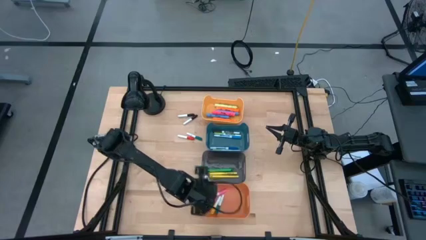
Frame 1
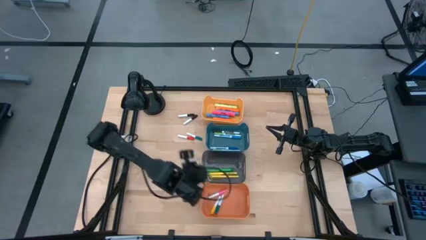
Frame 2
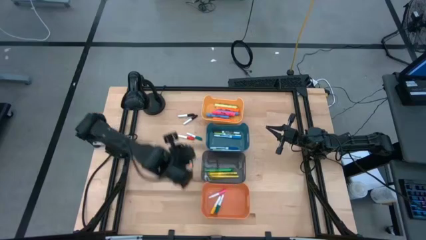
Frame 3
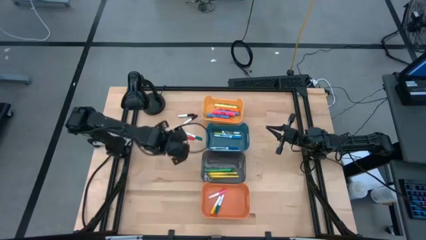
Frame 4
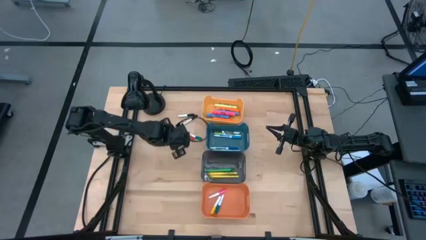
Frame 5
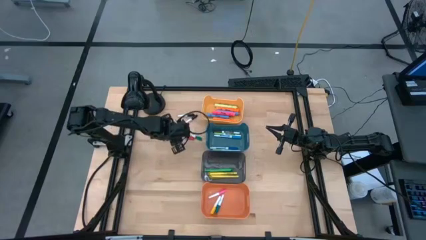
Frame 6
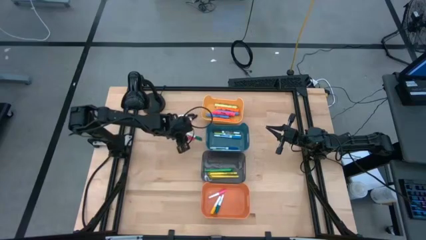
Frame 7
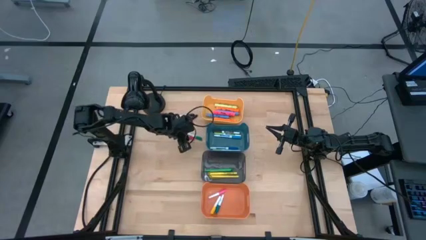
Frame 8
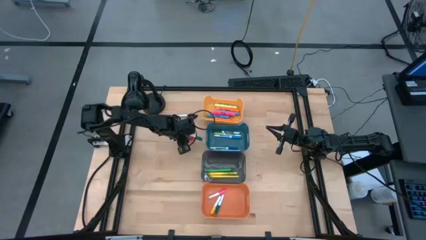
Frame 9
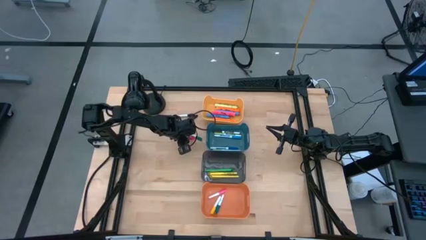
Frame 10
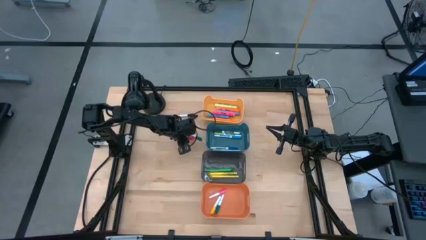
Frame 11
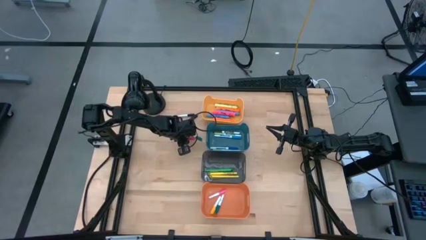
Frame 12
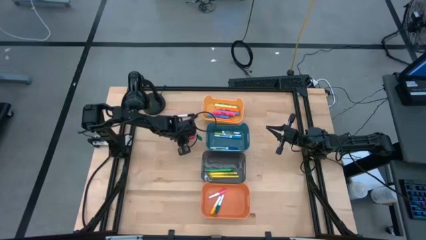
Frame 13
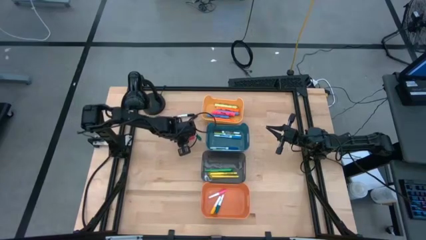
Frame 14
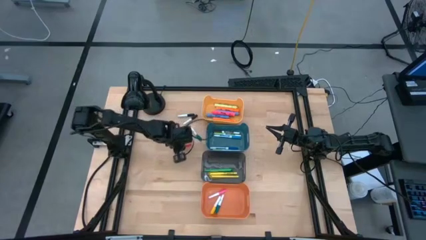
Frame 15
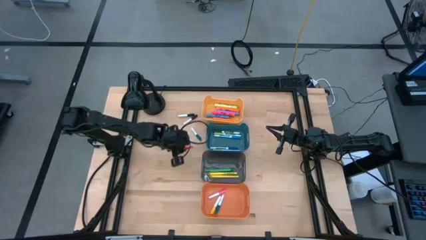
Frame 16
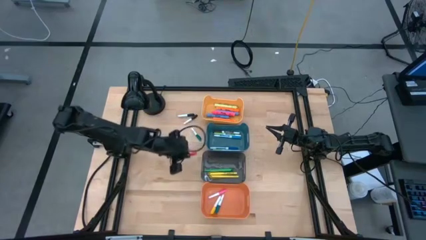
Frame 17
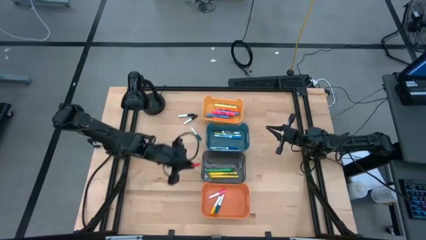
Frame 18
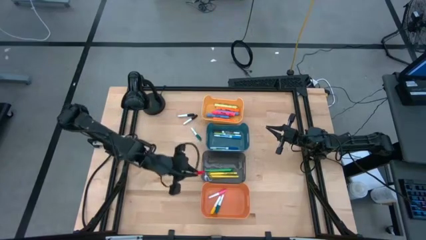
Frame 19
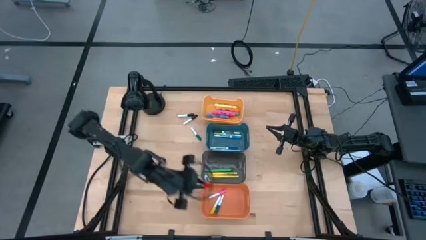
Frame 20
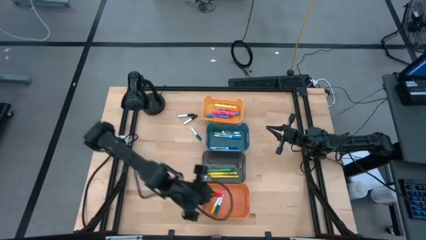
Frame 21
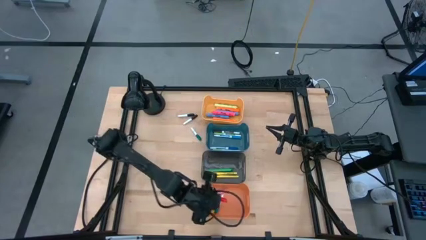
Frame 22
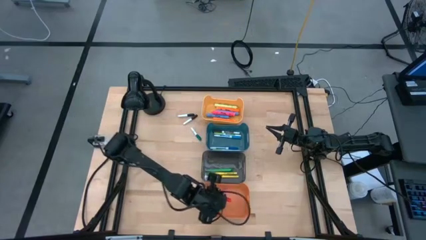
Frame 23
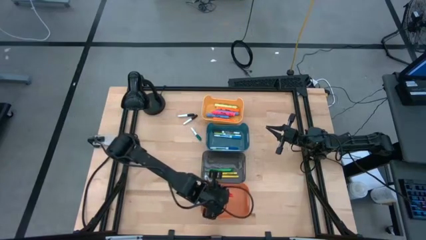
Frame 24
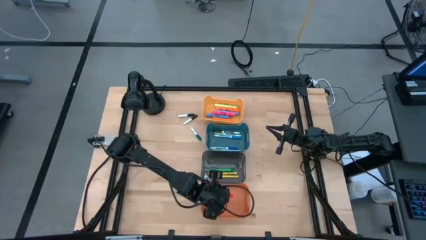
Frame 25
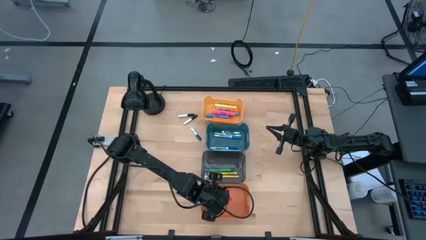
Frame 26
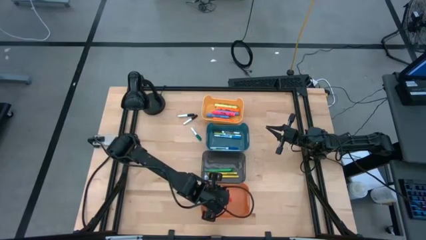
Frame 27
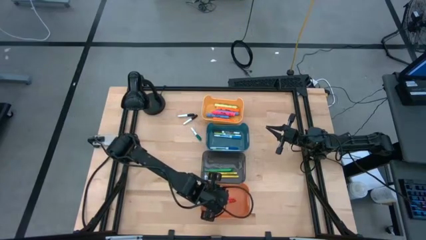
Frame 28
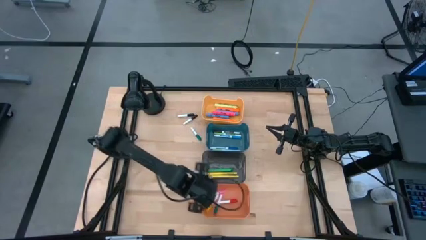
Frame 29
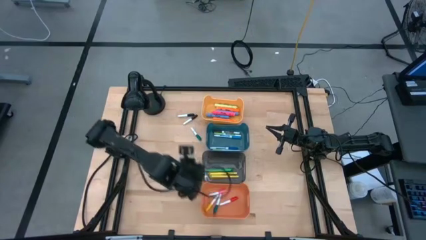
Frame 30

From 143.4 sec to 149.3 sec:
Task: Pick & Place Markers
Put the red mini marker into the orange bin

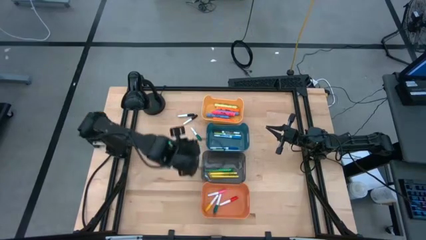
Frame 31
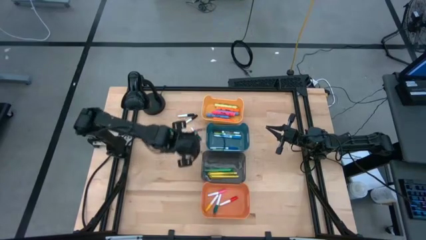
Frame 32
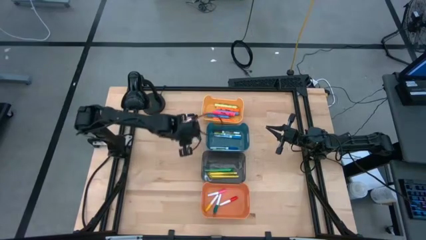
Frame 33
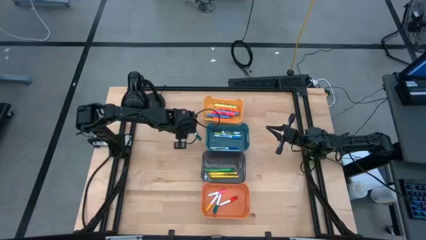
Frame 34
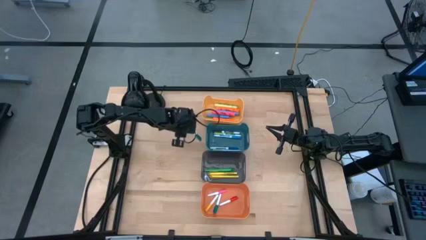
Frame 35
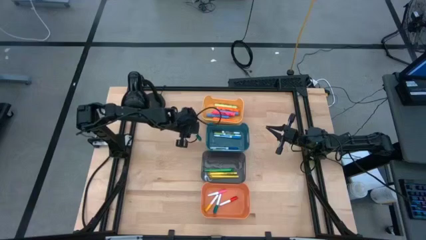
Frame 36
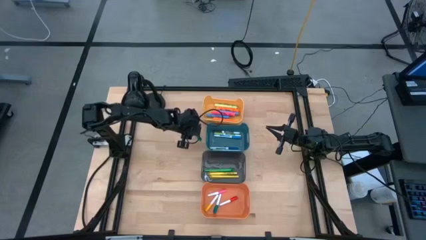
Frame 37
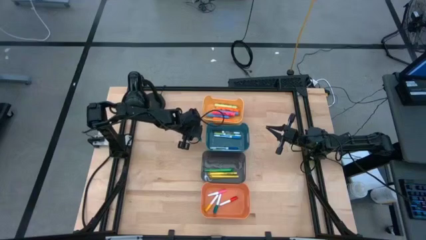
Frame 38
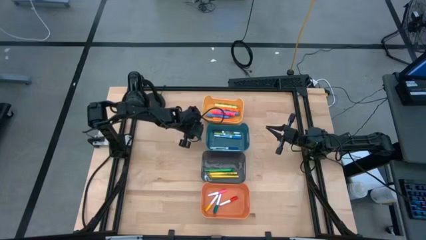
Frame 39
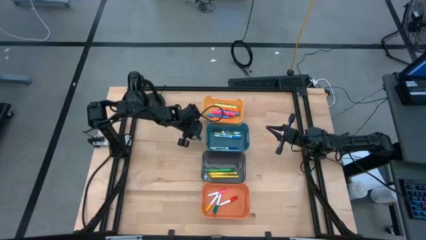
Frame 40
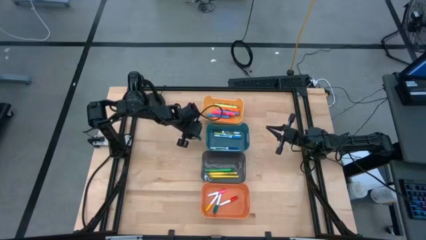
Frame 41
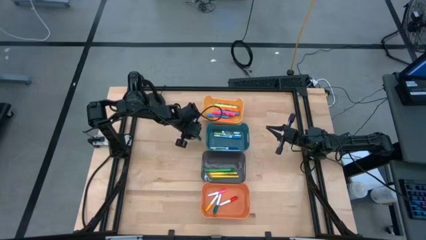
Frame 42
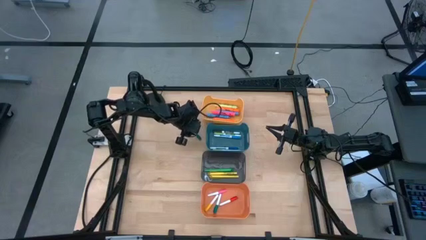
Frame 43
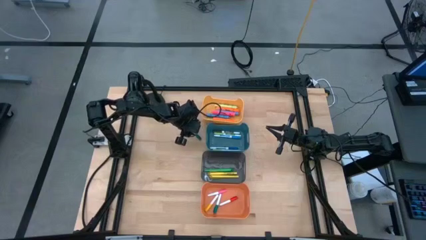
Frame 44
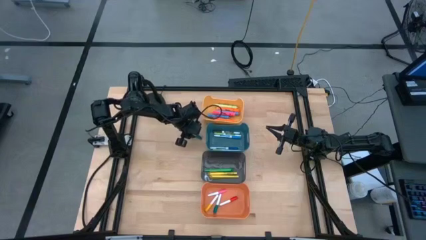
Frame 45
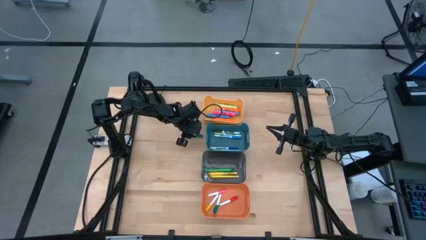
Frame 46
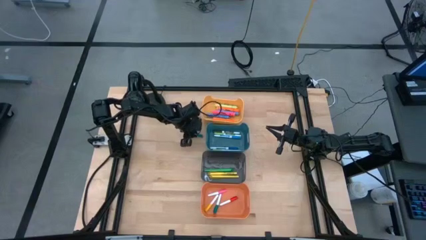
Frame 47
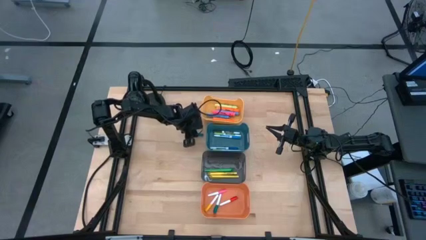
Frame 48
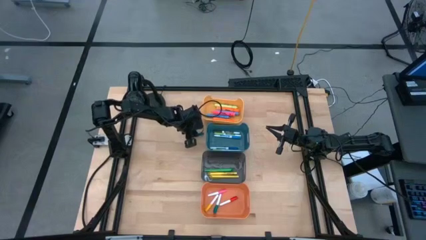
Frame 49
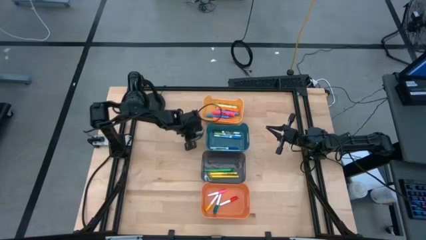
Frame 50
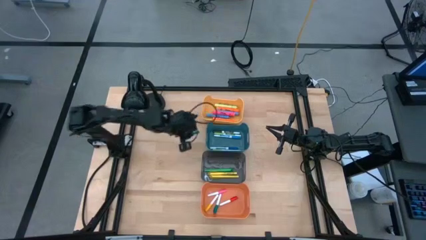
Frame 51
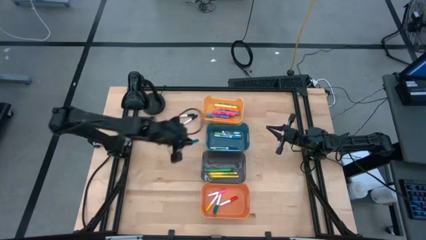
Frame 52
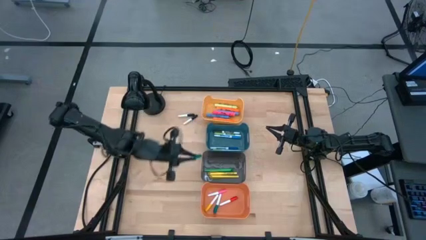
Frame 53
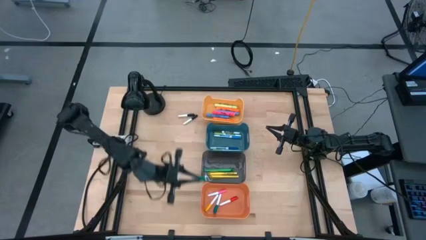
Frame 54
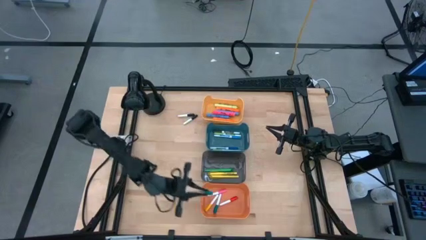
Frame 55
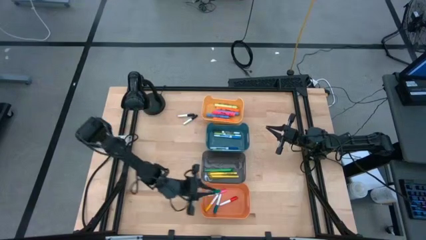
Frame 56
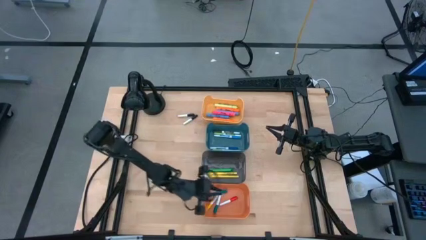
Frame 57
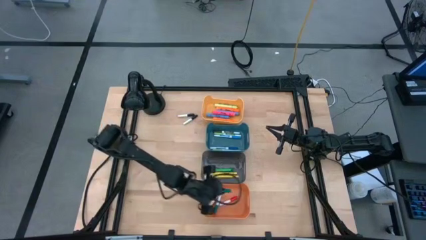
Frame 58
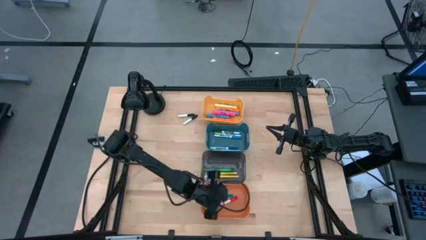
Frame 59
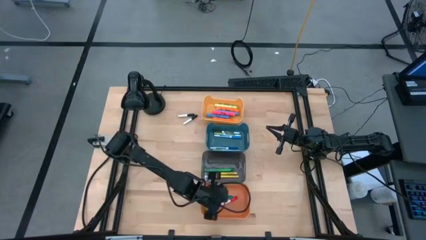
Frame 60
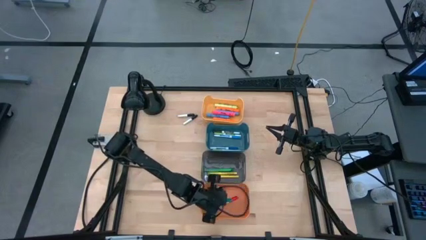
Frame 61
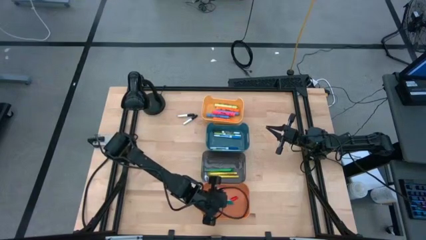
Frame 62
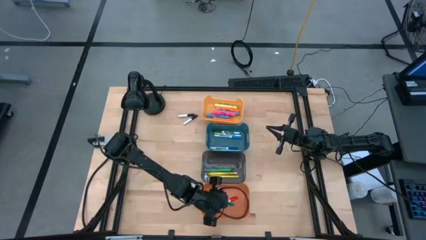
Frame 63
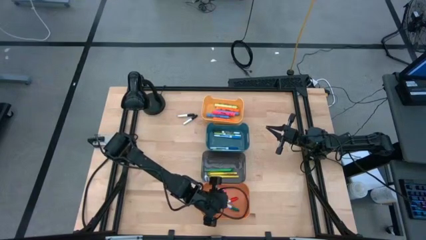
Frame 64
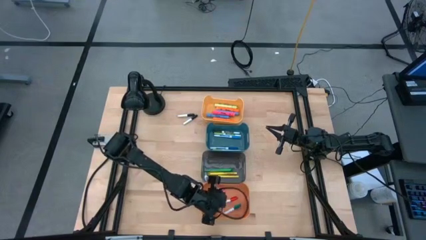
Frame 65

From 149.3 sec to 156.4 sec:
Put the green mini marker into the orange bin

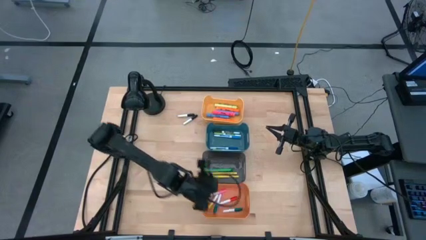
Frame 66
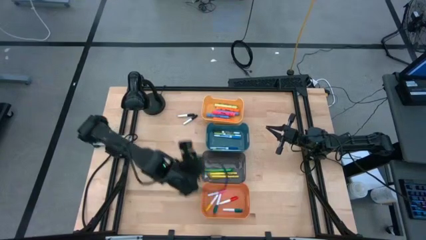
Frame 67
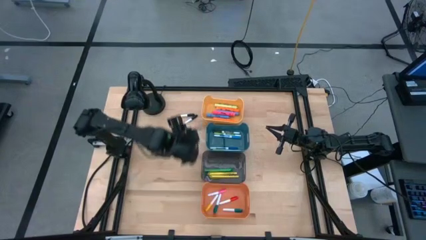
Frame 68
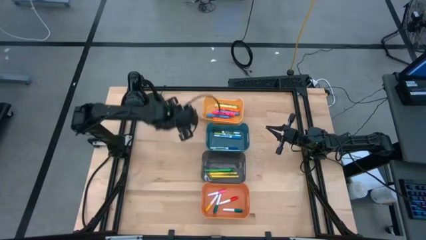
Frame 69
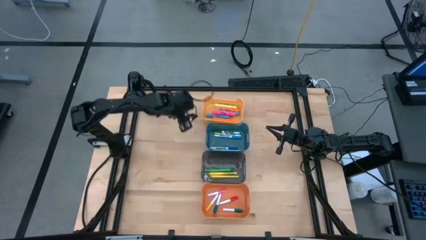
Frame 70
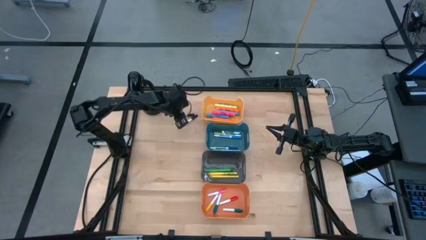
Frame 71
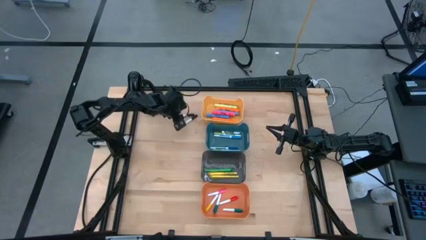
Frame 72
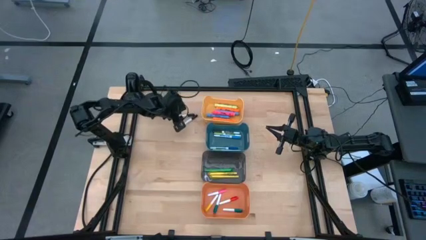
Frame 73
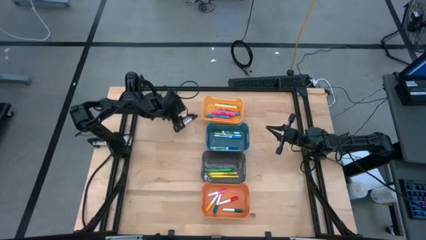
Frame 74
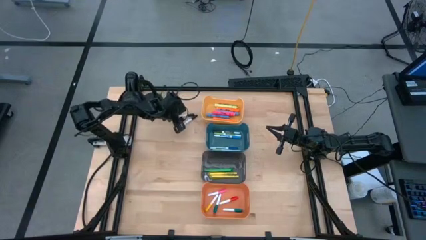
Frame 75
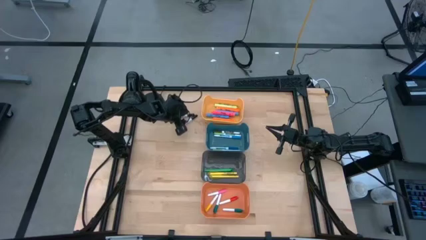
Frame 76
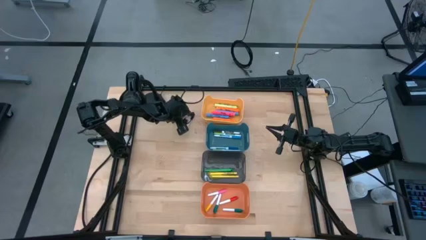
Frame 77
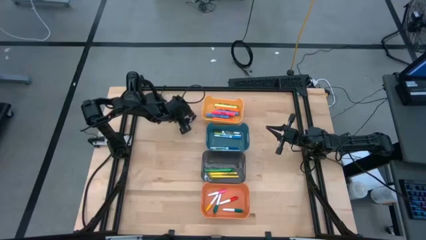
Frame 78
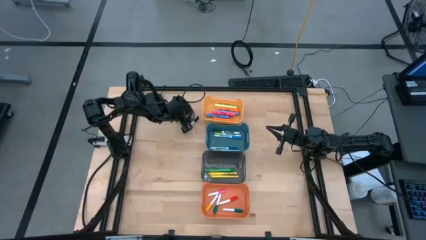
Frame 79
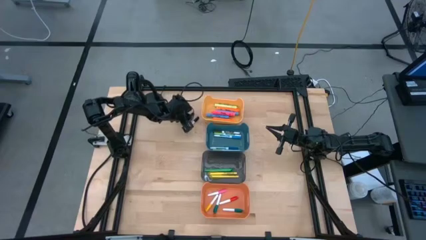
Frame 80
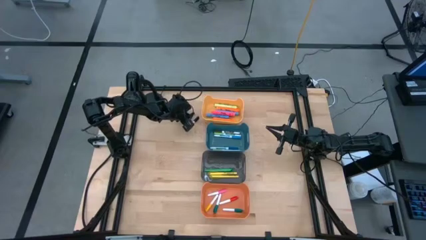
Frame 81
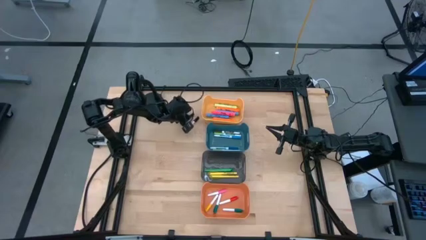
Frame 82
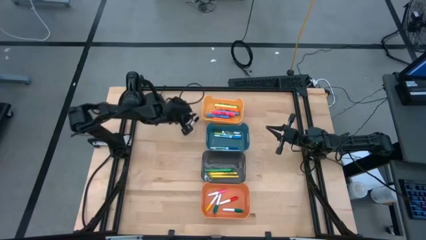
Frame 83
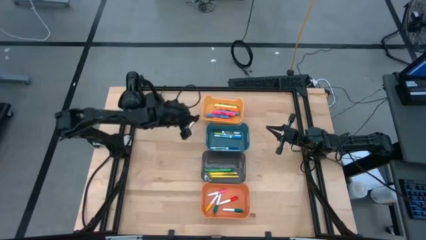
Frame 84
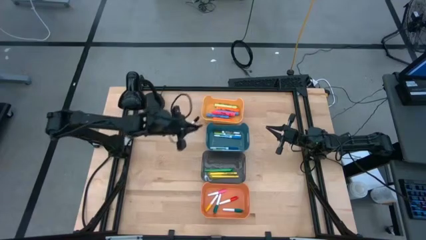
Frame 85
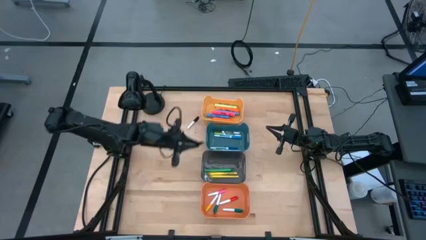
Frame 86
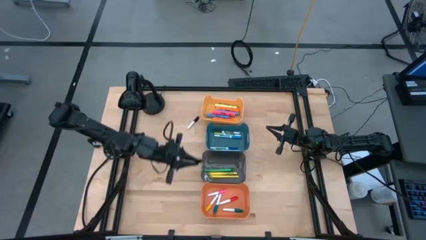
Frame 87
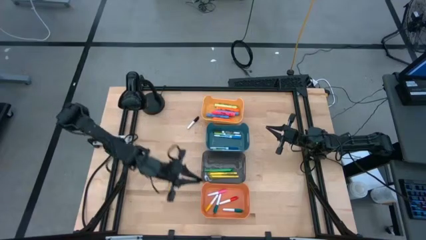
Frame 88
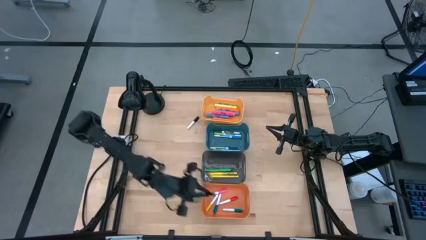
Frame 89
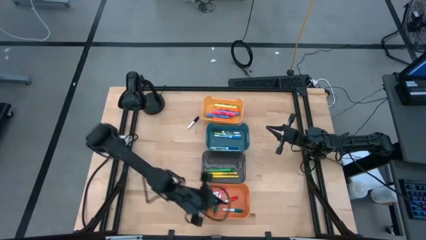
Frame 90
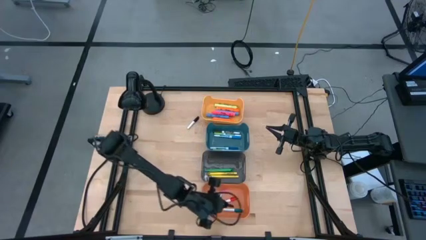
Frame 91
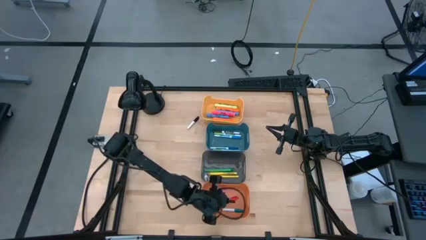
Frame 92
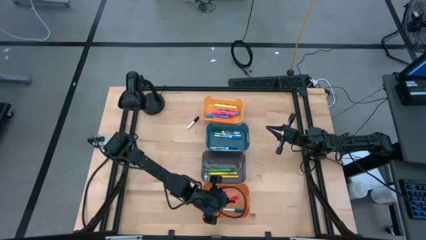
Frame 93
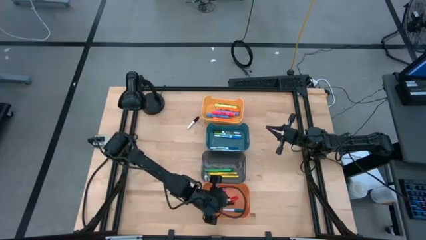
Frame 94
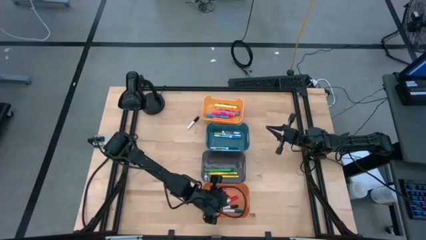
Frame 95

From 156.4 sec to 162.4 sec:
Put the top black mini marker into the orange bin
